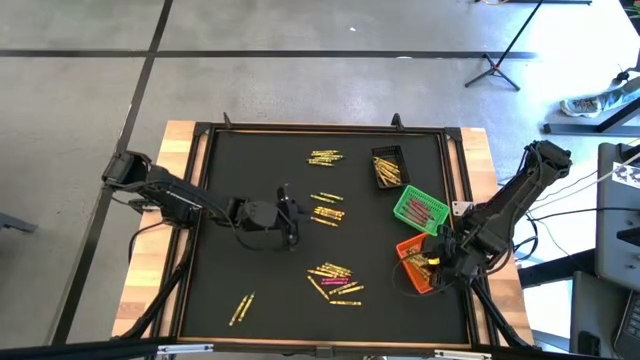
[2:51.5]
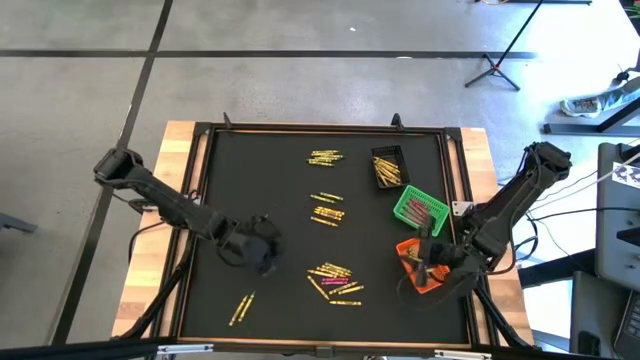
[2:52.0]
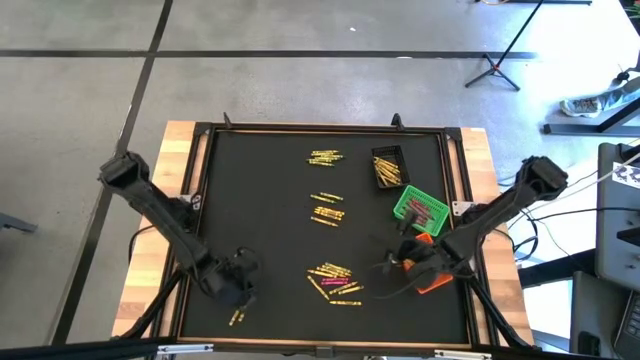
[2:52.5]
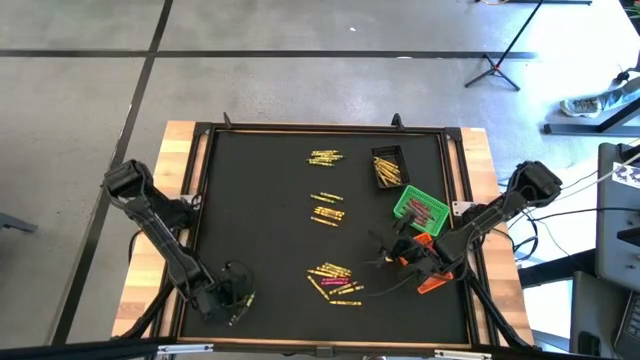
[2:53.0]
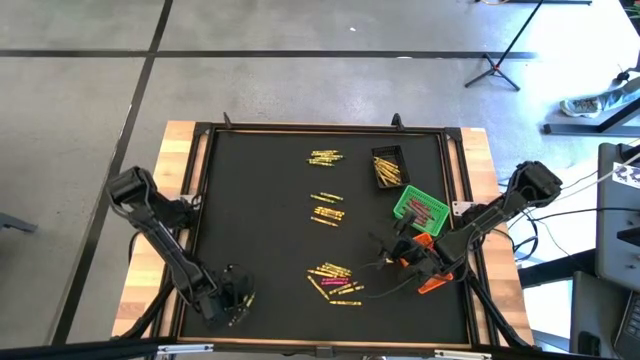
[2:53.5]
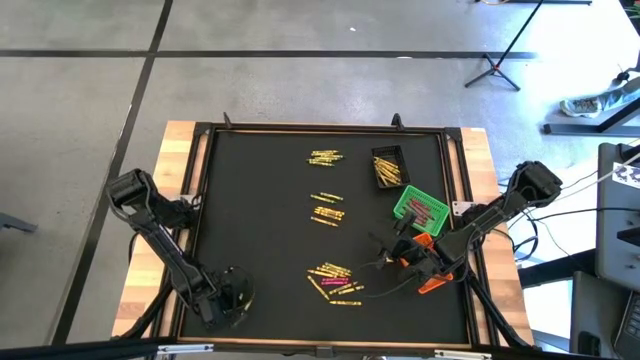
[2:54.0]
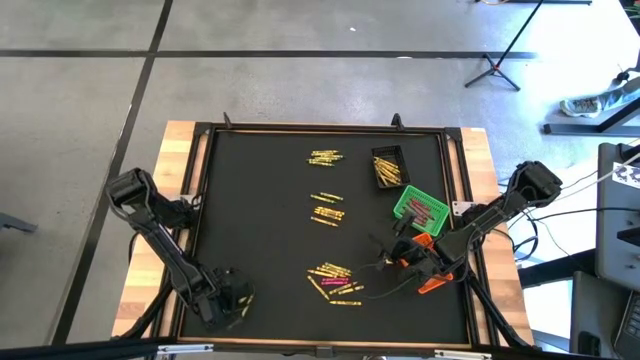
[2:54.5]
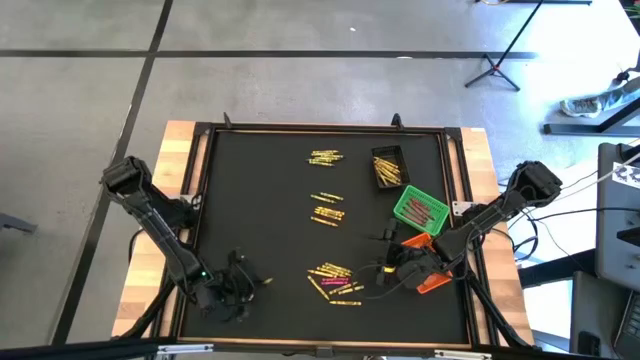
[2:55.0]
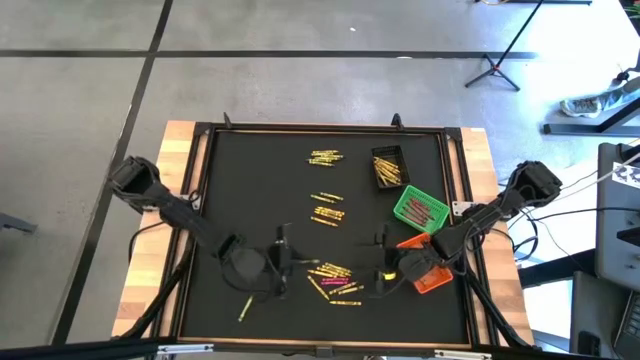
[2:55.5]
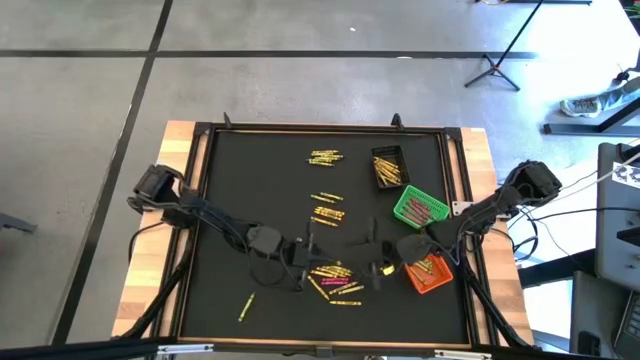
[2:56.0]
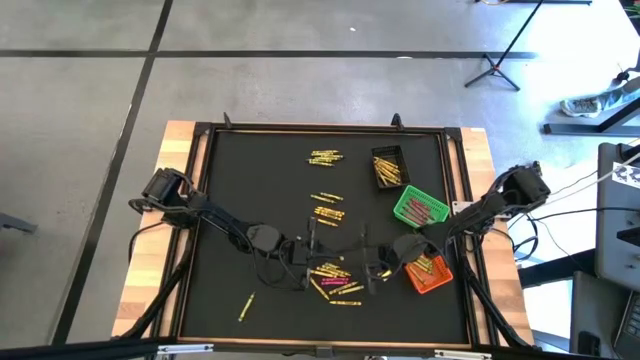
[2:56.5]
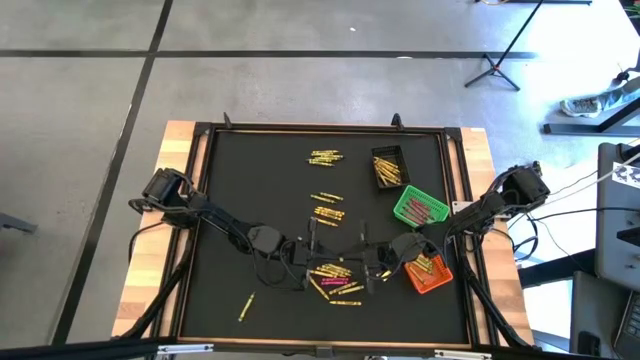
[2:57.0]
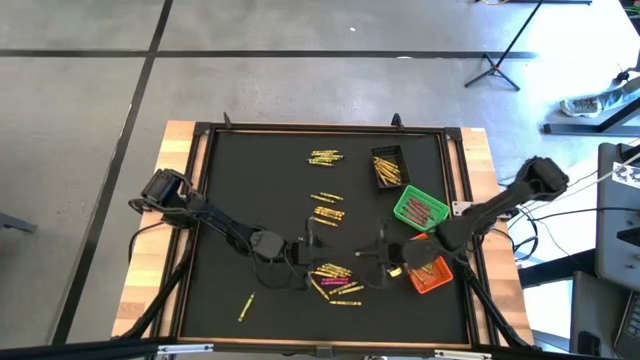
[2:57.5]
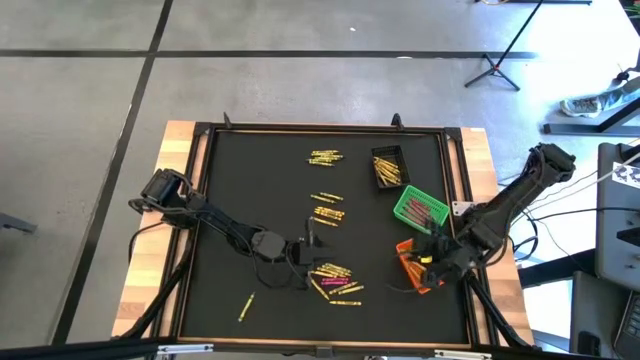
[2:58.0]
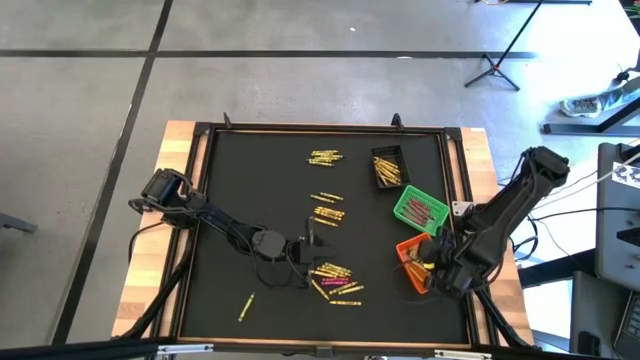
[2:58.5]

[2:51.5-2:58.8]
Task: Sort crayons
Put the light green crayon into the orange basket

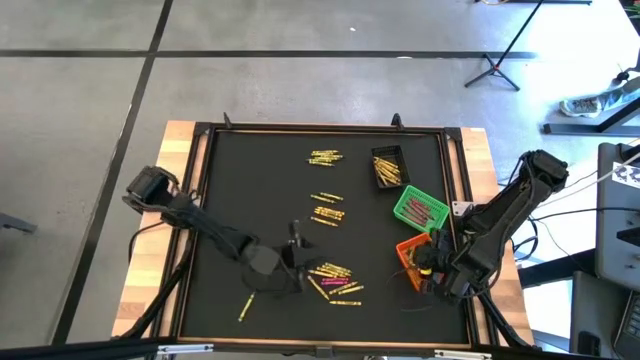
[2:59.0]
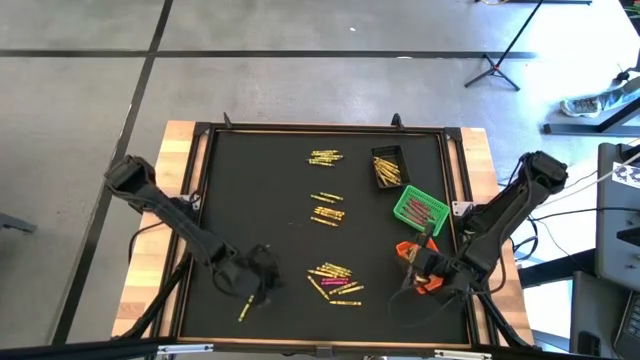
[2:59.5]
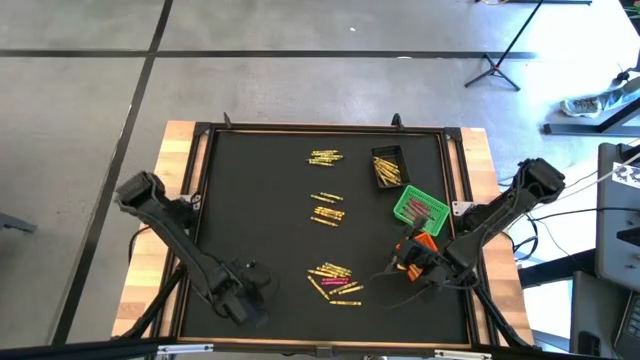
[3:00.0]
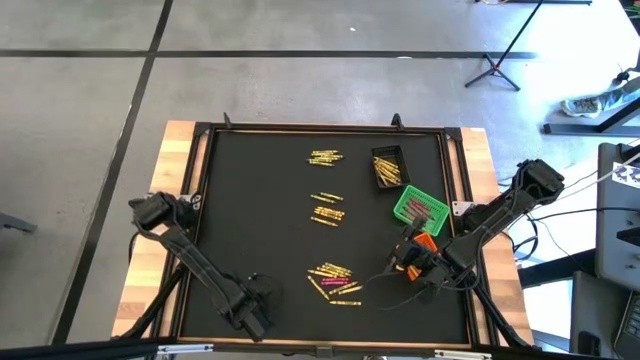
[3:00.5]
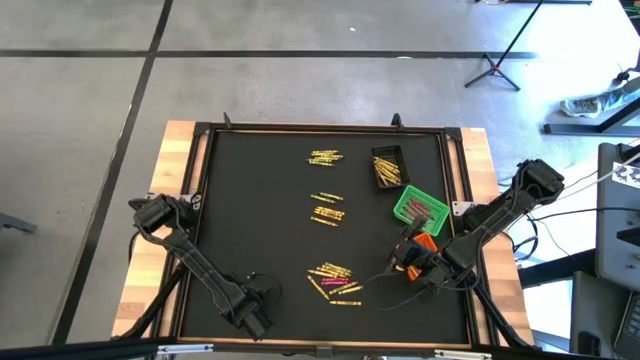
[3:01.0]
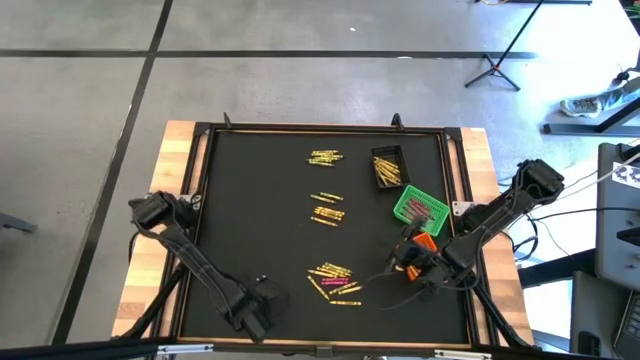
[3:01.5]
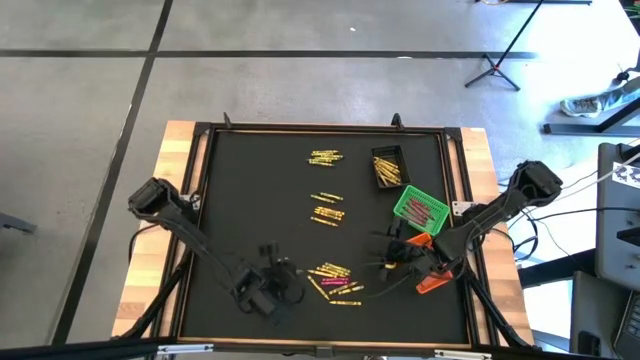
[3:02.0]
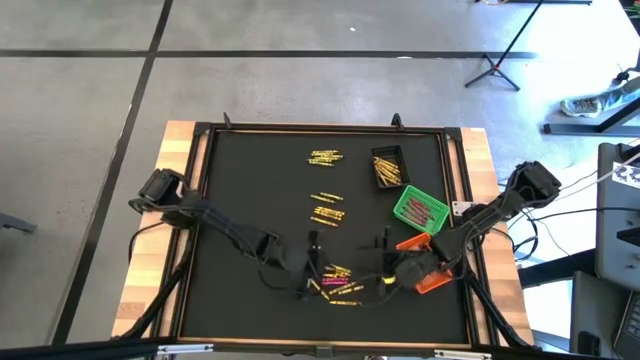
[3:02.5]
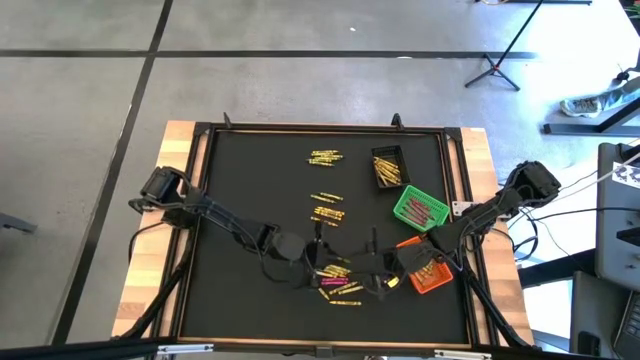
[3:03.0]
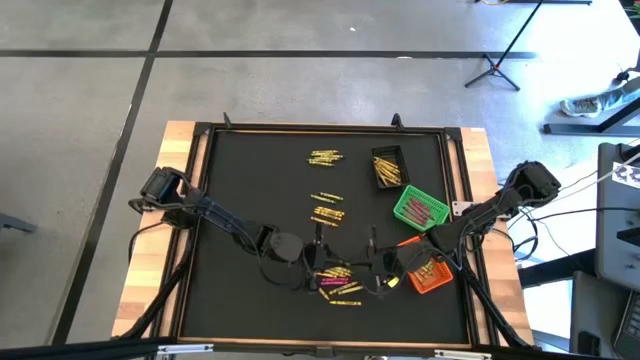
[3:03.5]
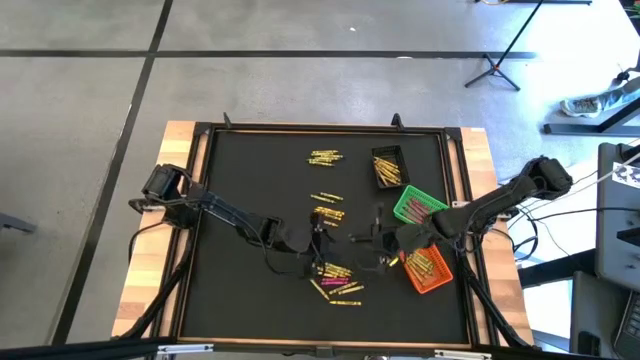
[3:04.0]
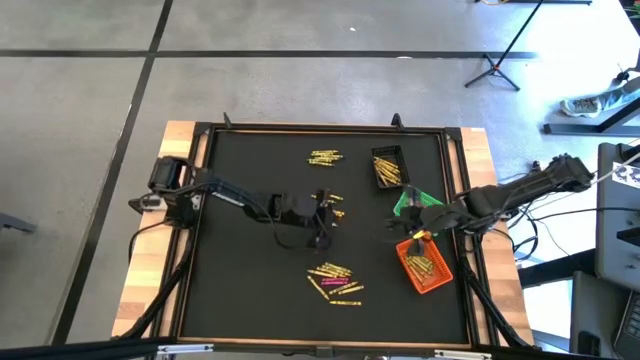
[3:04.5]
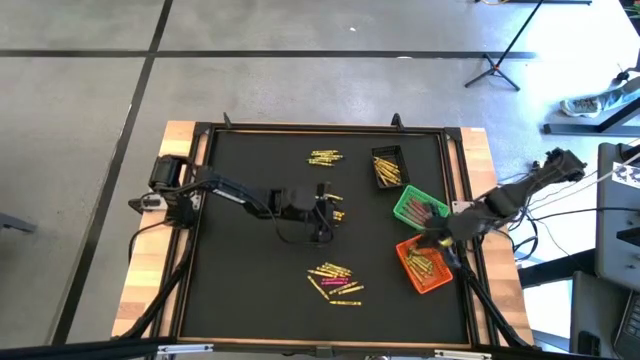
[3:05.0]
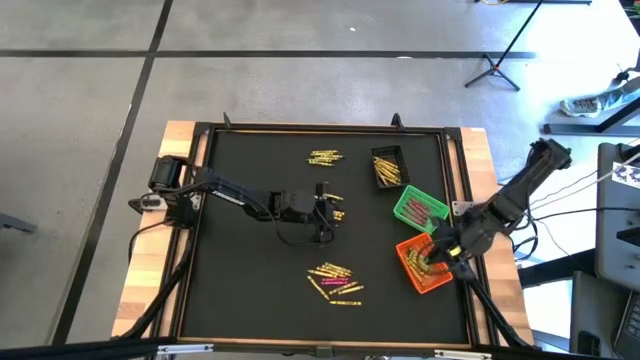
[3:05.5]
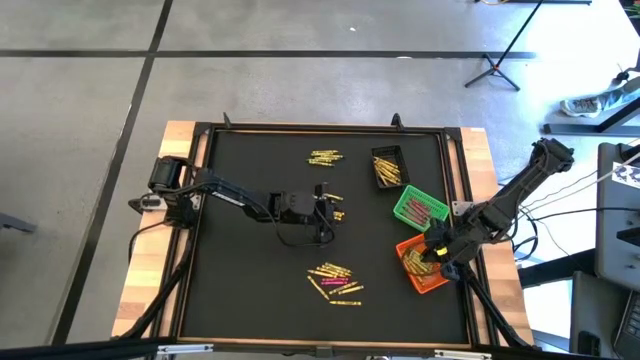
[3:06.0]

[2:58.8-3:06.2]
Put the green crayon into the orange basket

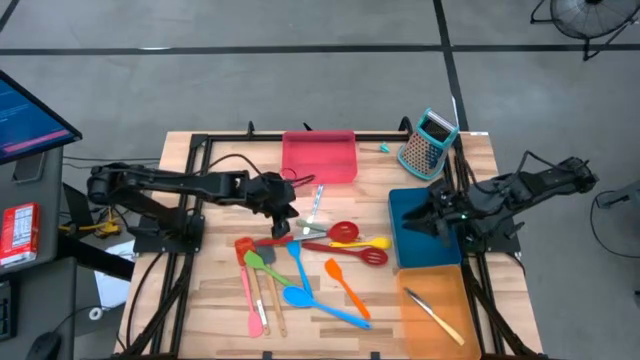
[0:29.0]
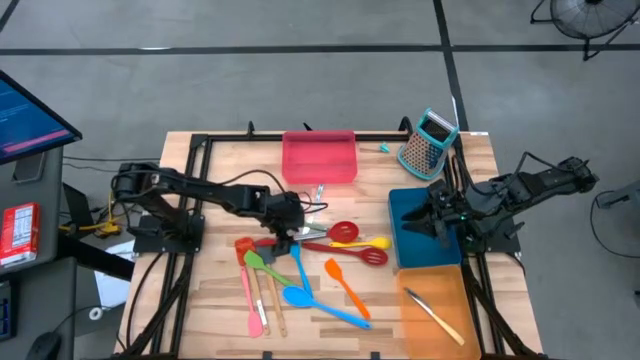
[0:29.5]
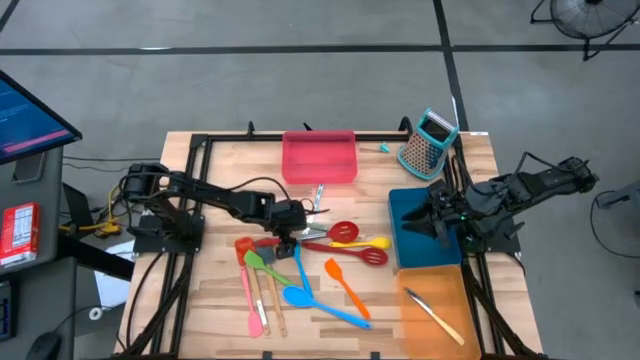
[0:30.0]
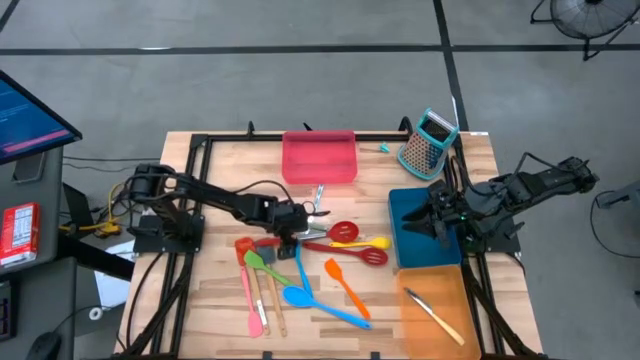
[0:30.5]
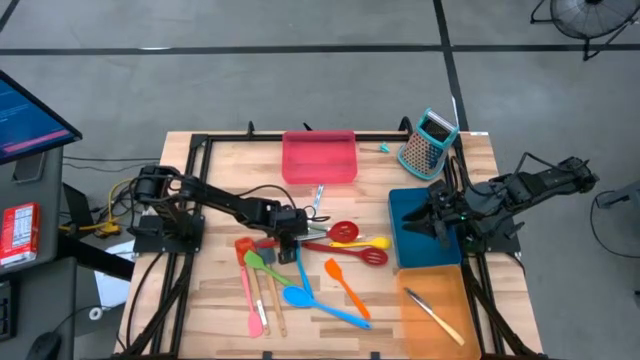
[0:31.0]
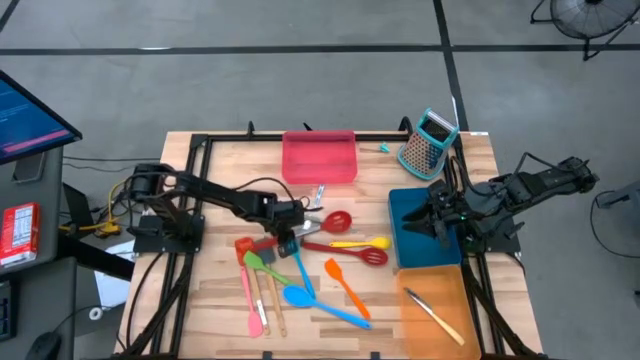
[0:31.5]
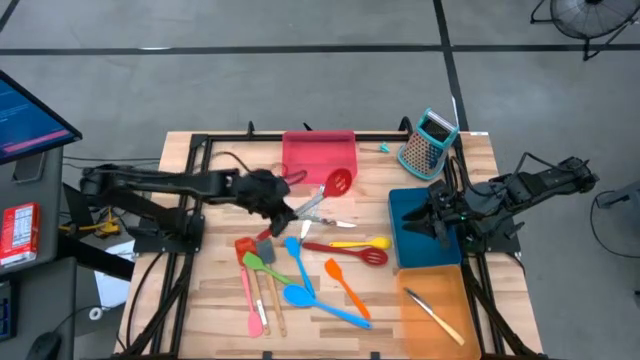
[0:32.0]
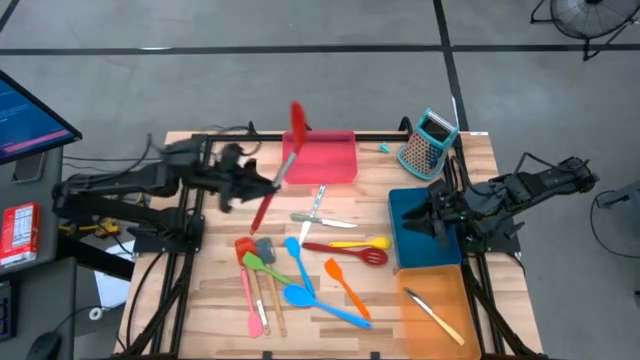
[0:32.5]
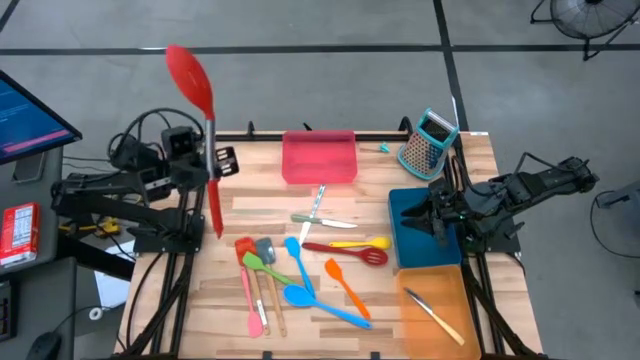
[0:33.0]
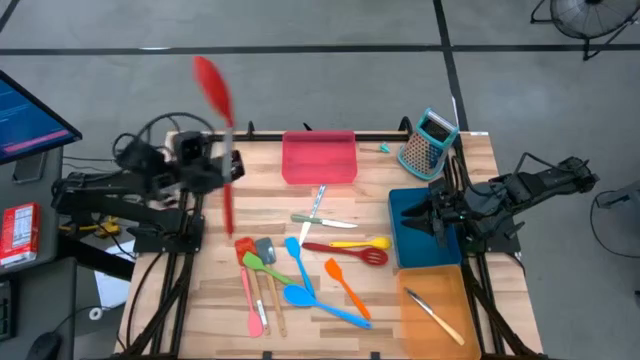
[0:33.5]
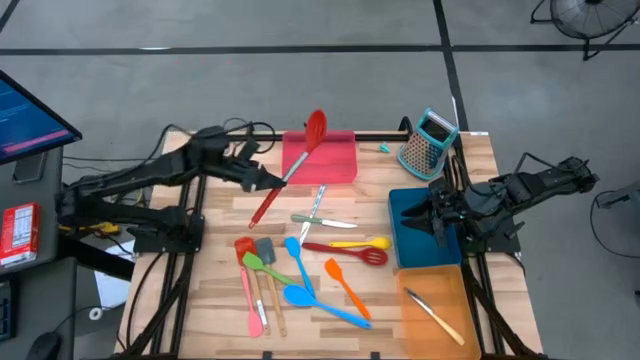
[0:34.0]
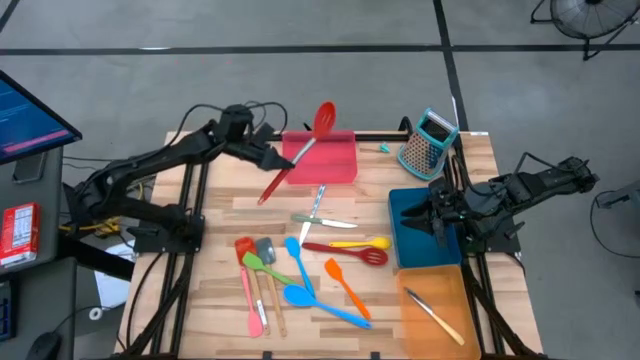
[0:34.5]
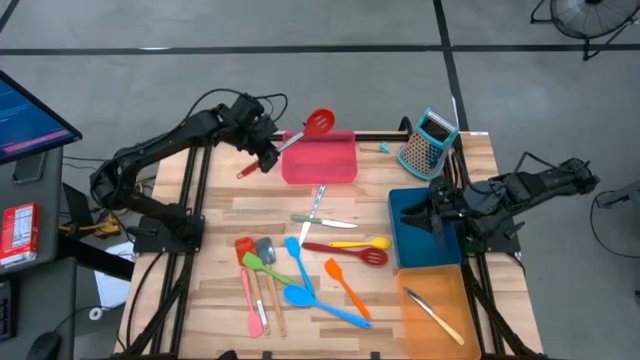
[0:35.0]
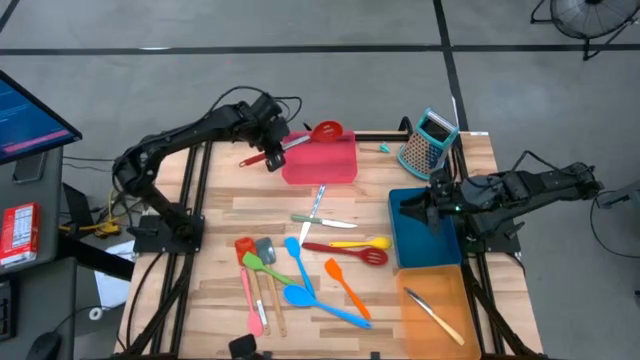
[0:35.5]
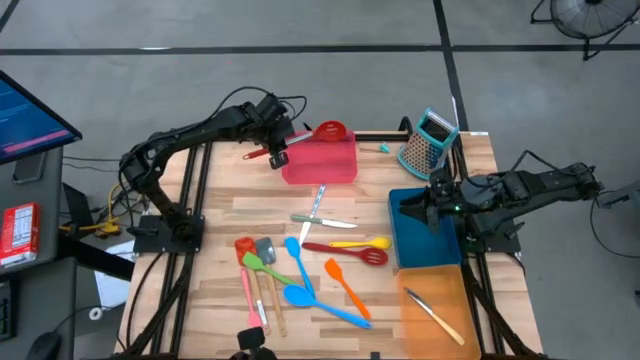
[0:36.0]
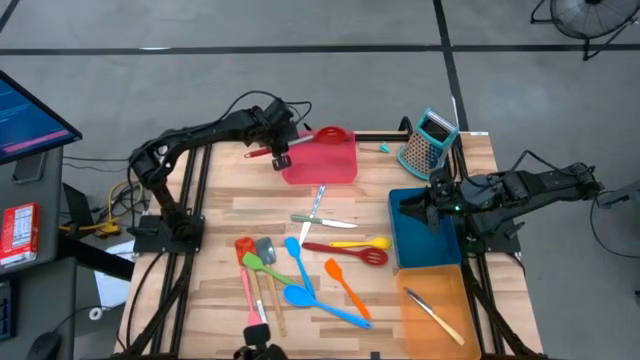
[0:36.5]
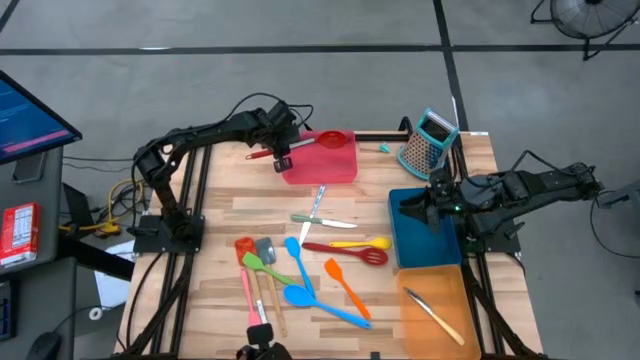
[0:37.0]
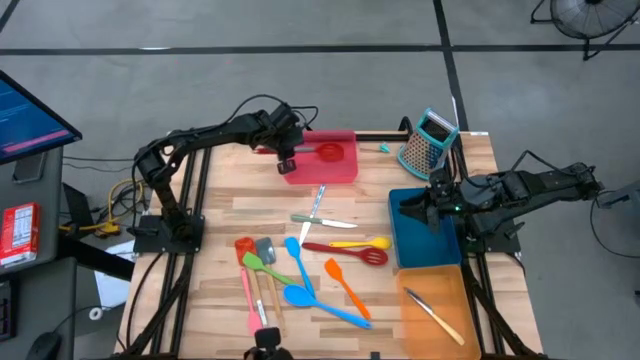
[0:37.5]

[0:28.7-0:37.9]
Task: Pick & Place Kitchen Items
Put the red serving spoon into the red bin
